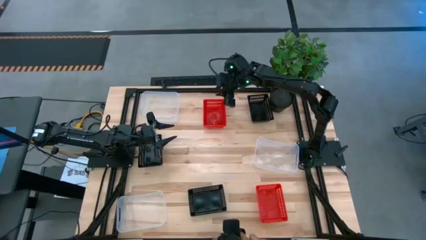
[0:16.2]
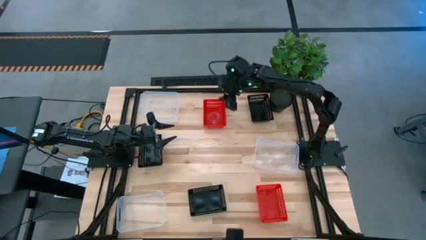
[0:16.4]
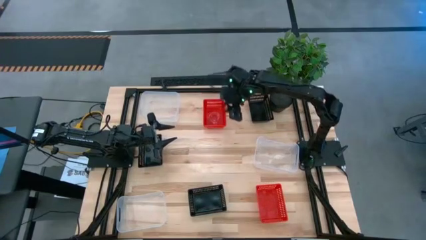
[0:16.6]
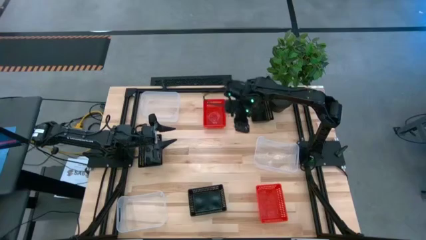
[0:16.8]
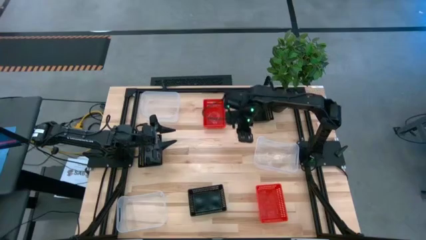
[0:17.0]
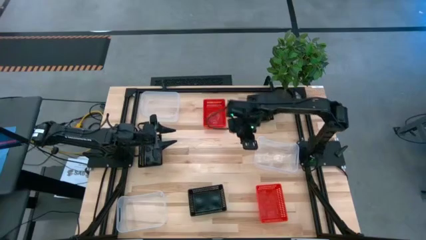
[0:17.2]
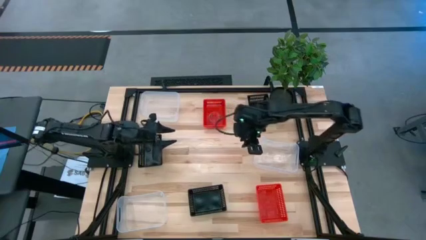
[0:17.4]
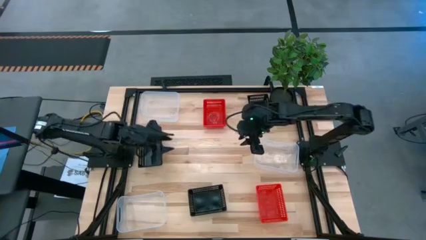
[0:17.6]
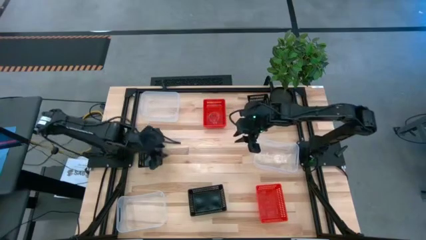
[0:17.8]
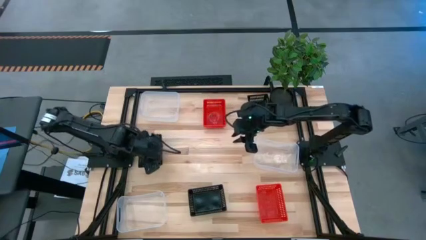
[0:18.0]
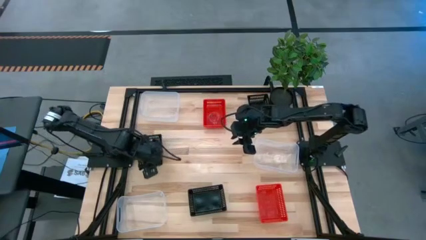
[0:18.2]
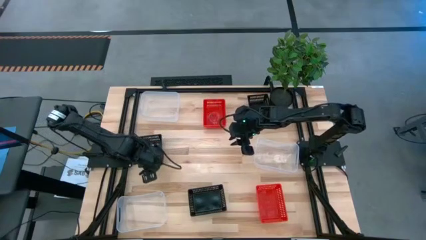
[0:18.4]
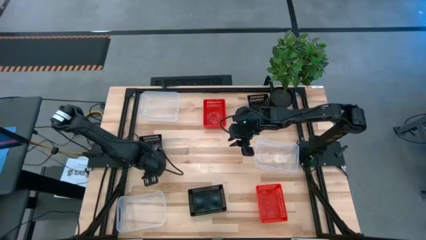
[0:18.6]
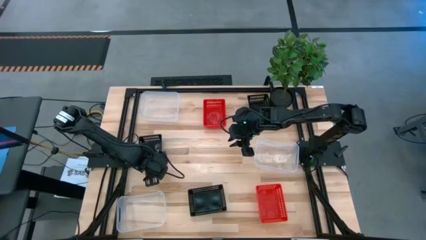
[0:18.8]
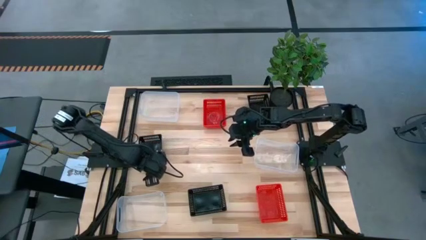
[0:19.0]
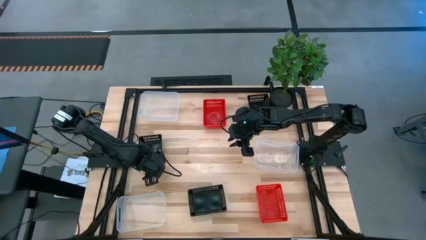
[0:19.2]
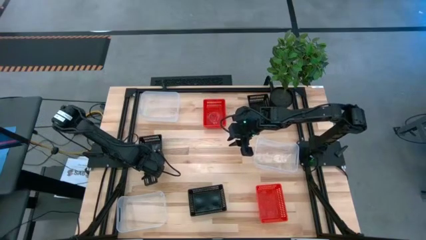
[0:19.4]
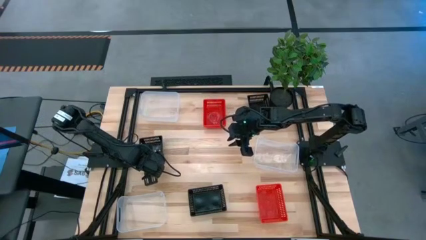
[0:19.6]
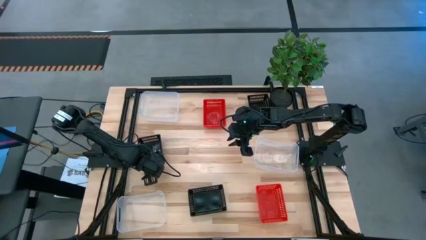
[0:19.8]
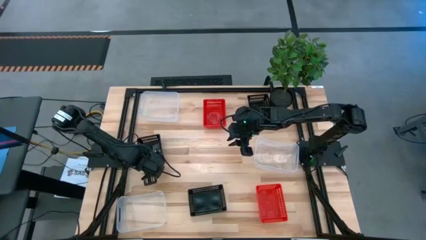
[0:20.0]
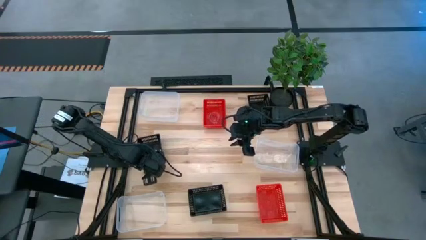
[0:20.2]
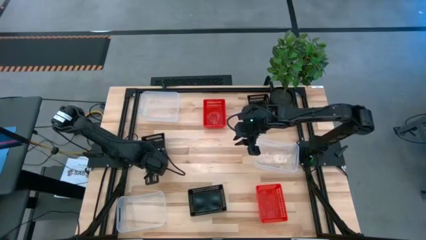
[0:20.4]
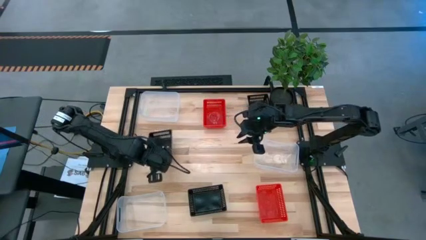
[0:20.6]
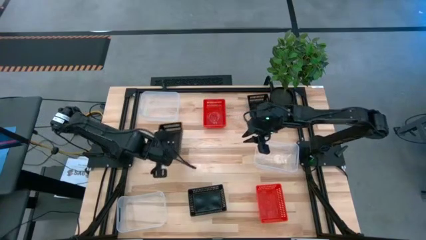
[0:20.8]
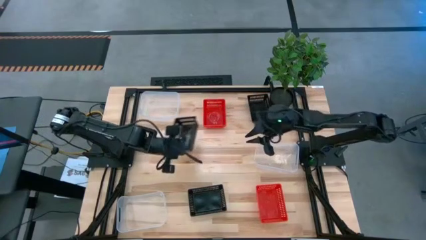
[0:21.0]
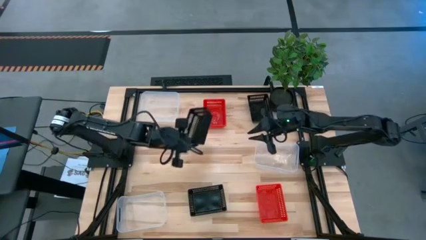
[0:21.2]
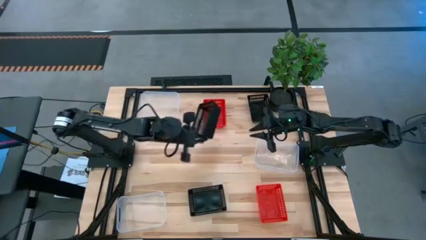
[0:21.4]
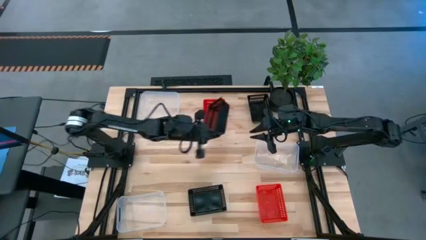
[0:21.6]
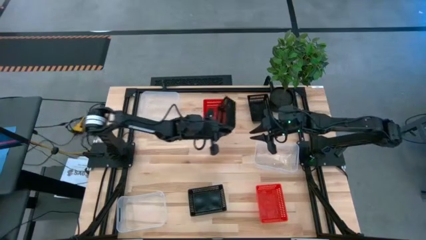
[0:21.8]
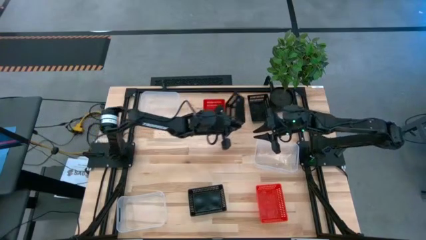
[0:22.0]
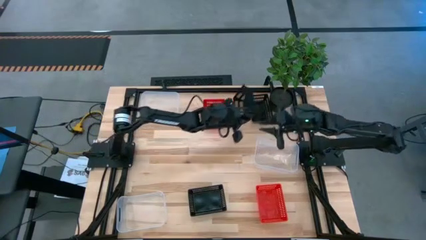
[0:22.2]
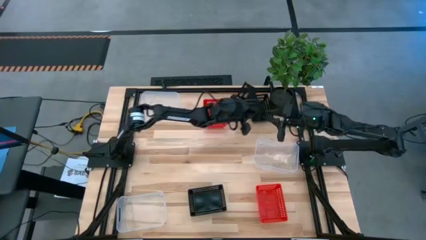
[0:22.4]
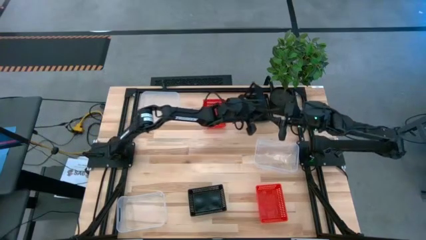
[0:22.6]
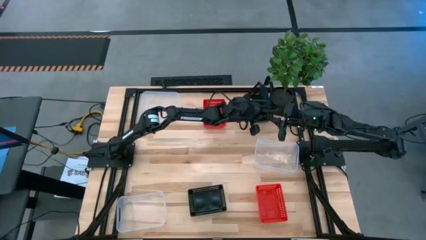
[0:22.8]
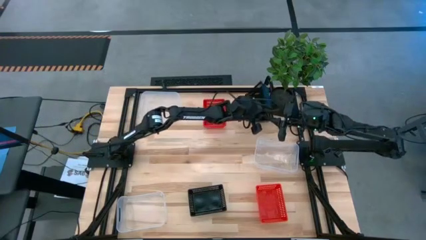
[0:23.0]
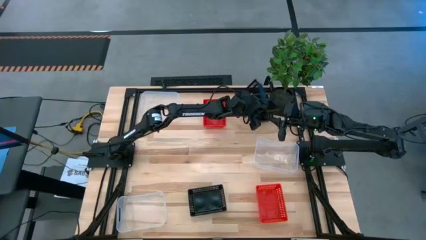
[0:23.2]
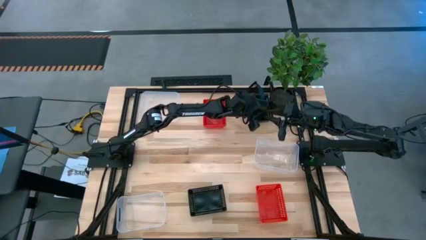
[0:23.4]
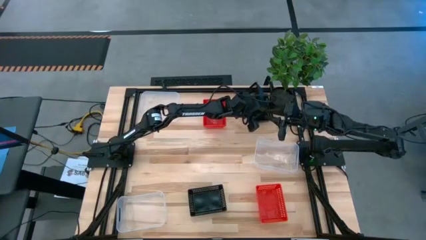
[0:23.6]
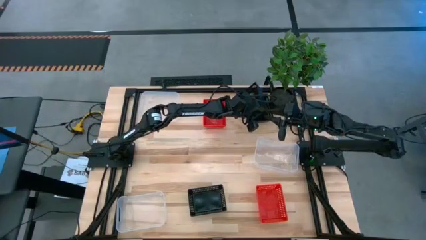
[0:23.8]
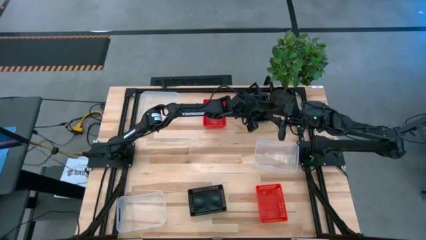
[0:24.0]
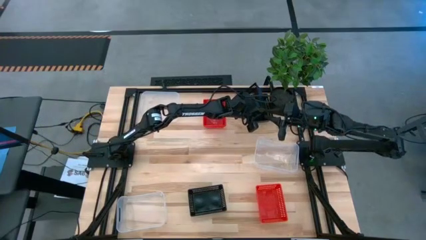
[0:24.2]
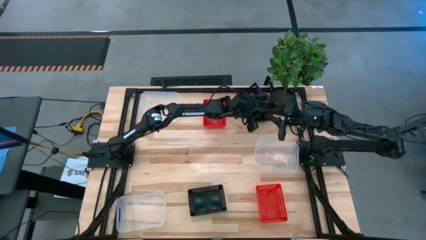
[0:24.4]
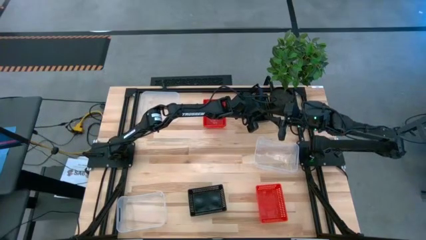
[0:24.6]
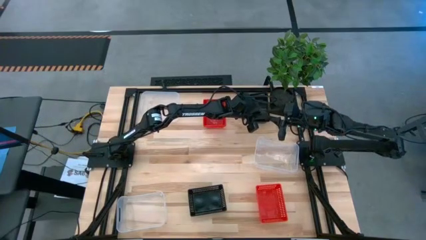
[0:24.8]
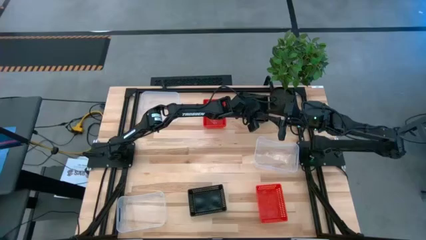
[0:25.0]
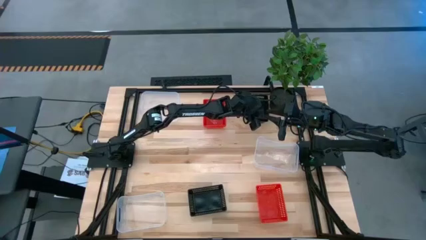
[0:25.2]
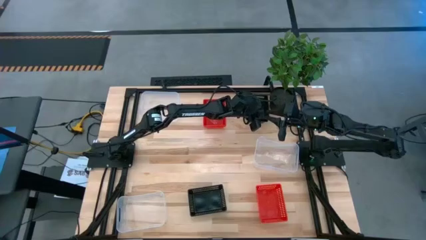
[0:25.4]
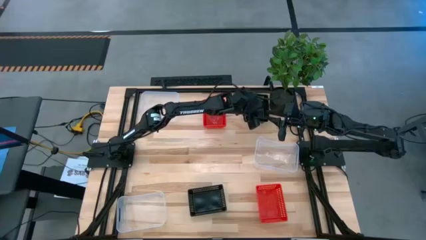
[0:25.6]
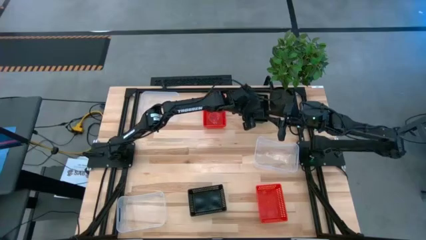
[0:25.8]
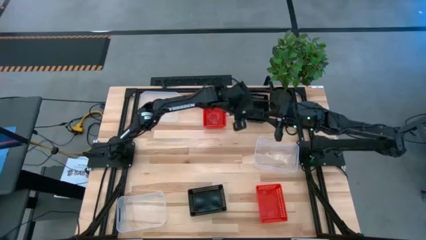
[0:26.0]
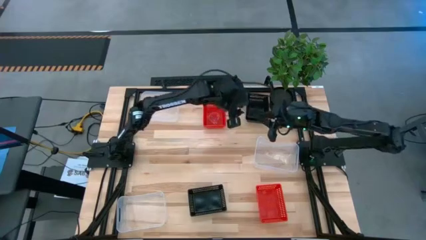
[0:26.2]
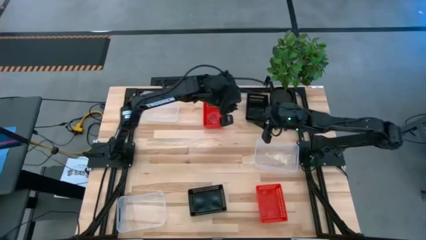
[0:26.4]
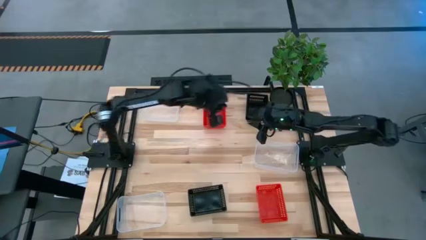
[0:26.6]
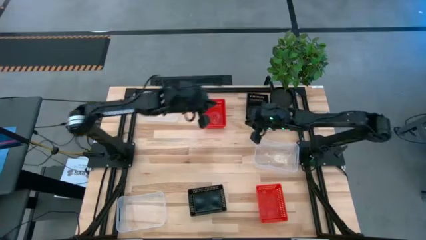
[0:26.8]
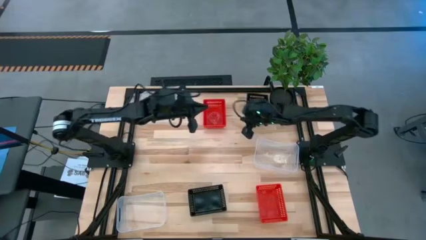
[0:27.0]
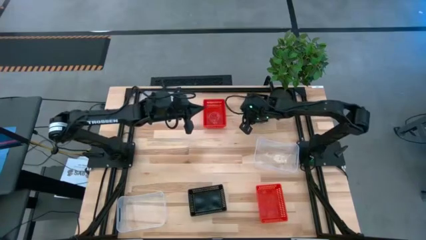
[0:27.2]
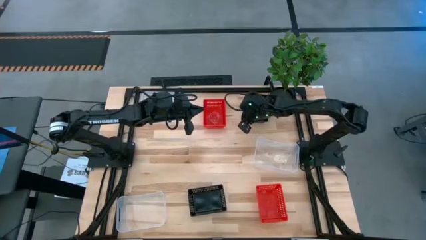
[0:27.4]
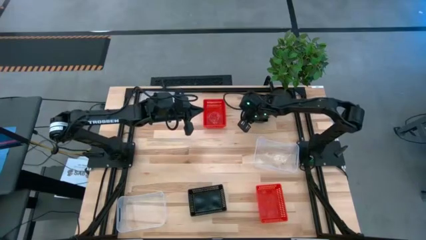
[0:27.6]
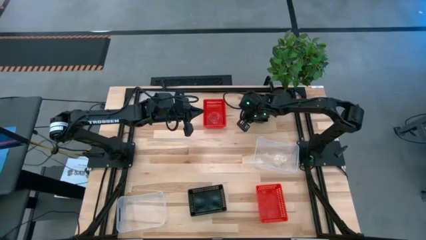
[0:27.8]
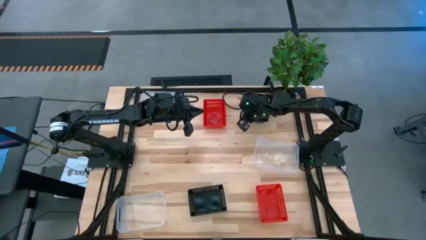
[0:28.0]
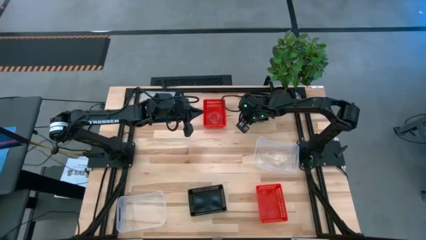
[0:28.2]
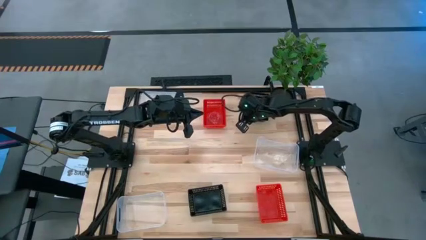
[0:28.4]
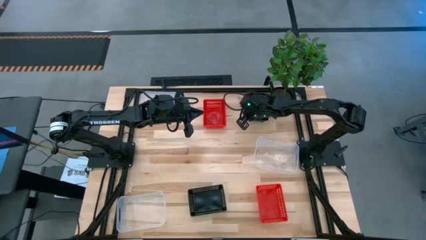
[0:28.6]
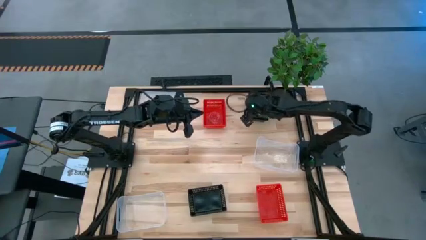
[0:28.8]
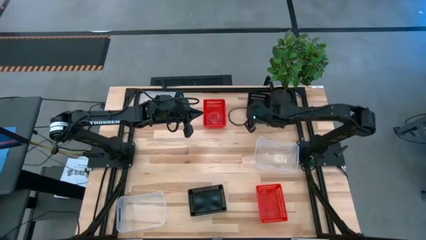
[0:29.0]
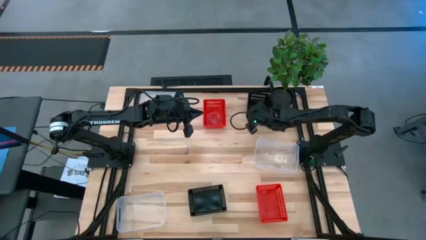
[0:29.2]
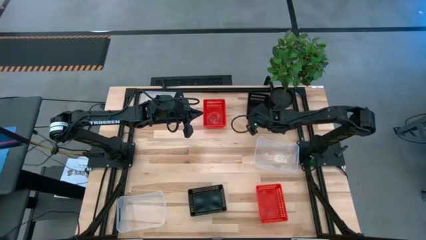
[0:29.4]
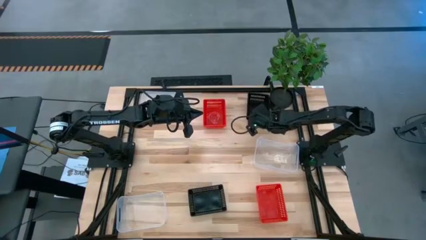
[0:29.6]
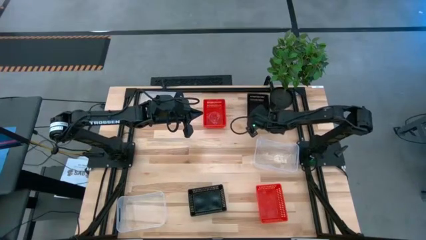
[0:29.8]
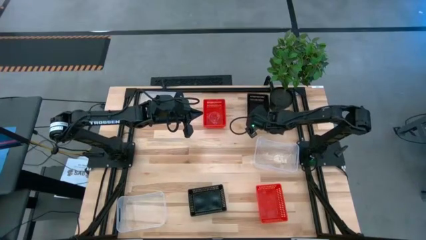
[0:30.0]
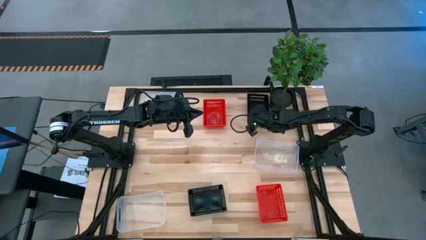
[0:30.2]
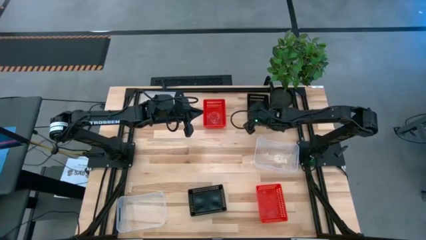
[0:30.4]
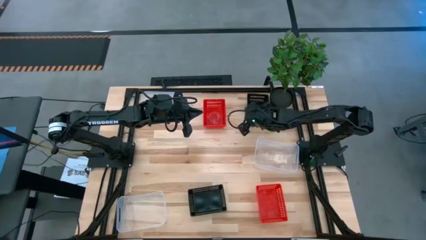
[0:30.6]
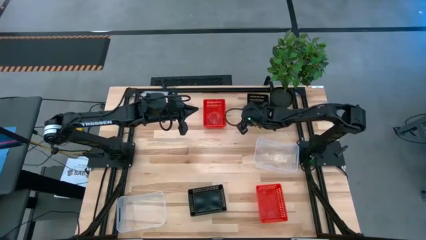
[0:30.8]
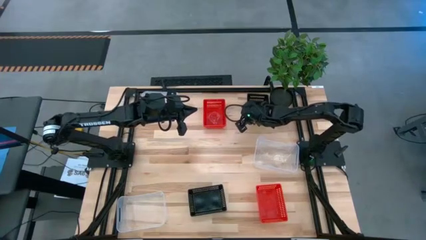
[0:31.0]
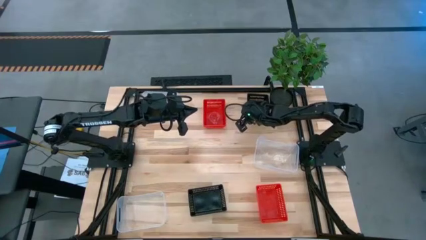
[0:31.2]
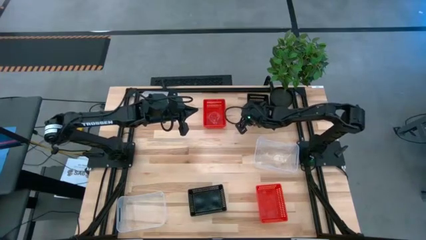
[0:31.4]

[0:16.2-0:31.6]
Stack the left black basket on the top black basket
